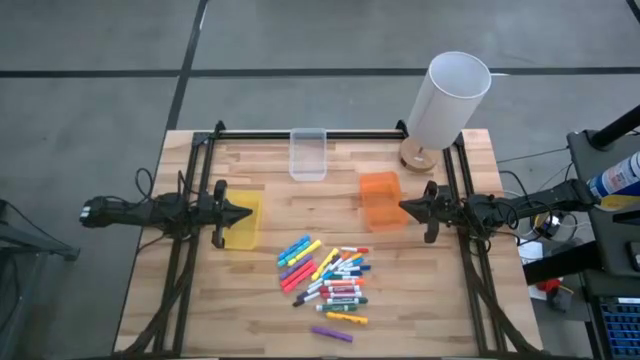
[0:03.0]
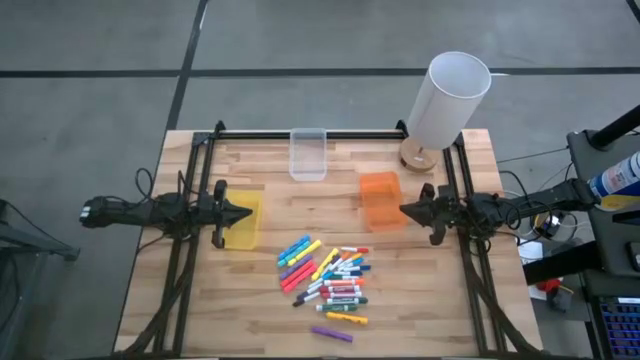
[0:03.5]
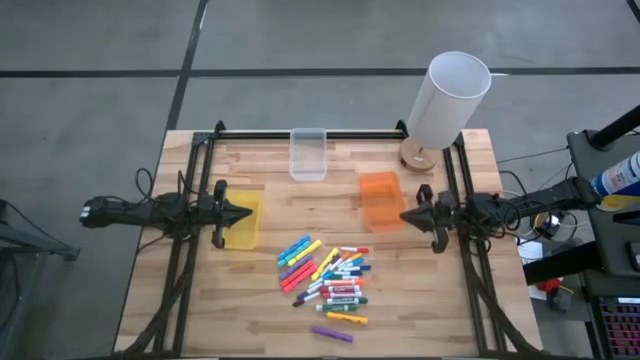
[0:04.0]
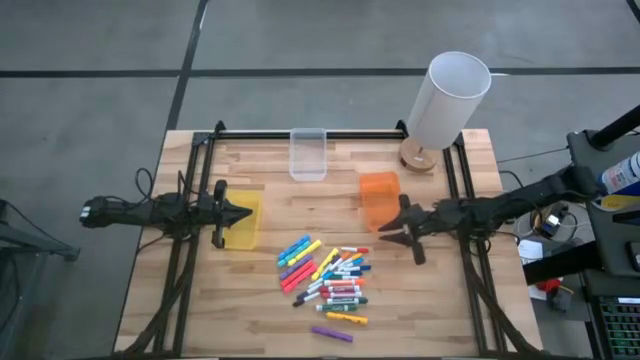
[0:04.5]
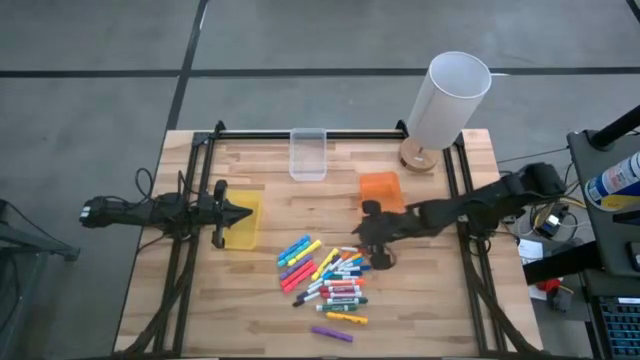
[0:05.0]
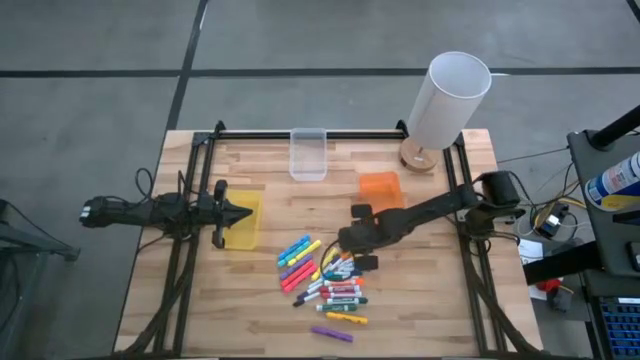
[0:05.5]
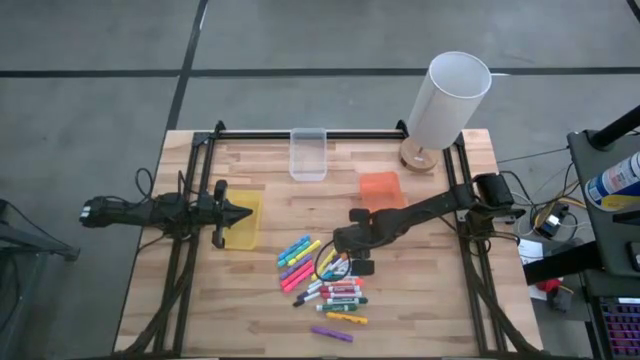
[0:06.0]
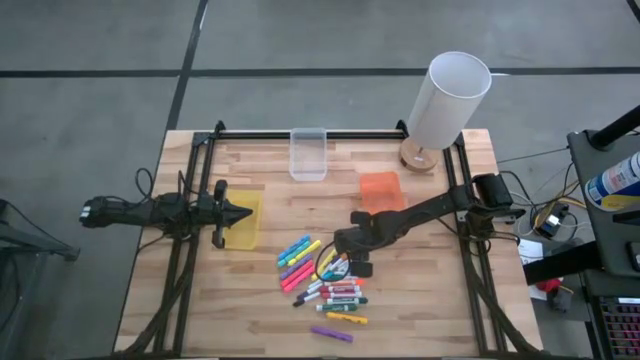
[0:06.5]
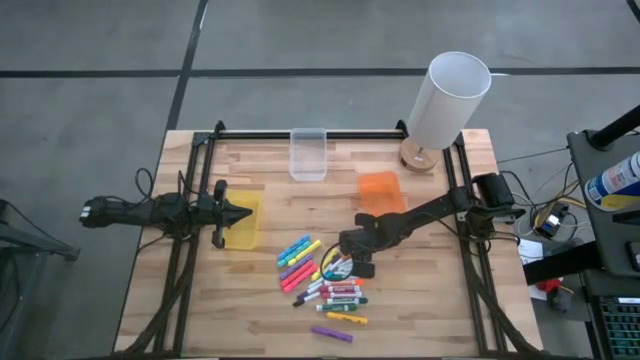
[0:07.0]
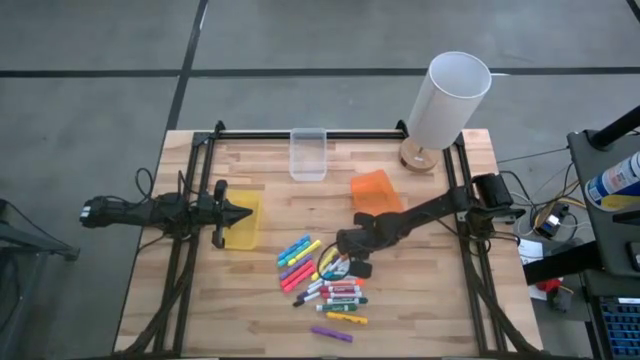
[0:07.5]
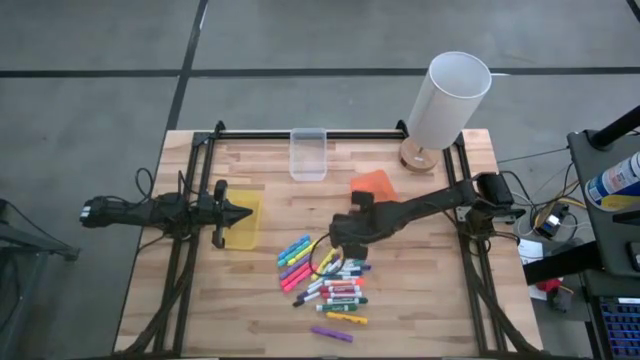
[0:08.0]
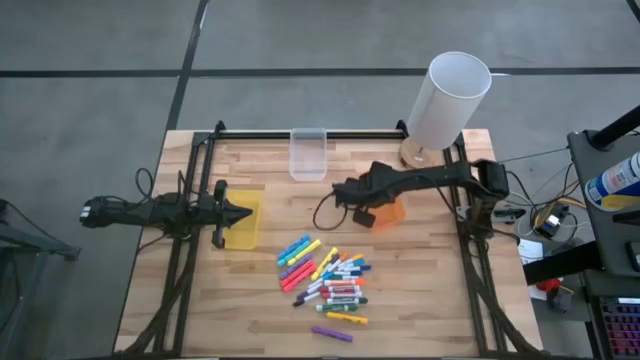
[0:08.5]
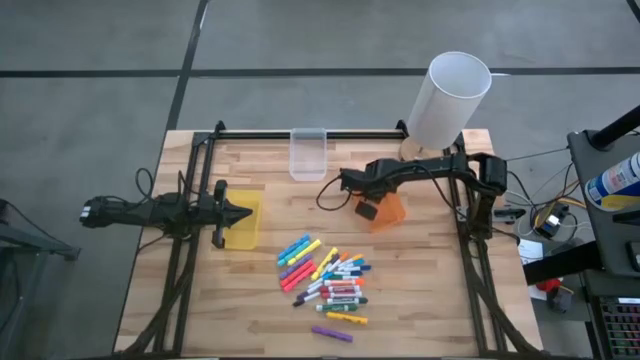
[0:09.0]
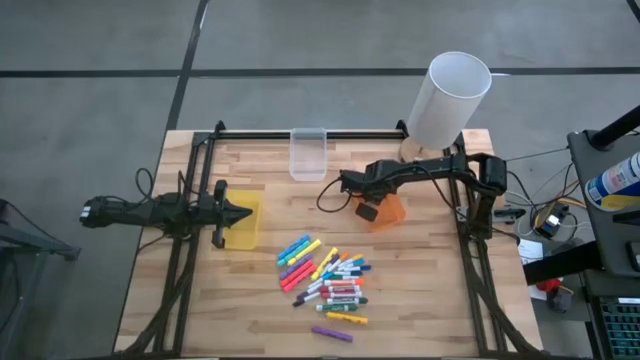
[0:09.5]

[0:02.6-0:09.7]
Task: Pick & Place Markers
Put the small red marker into the orange bin

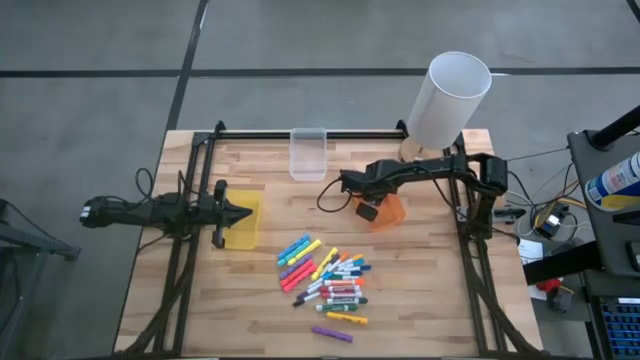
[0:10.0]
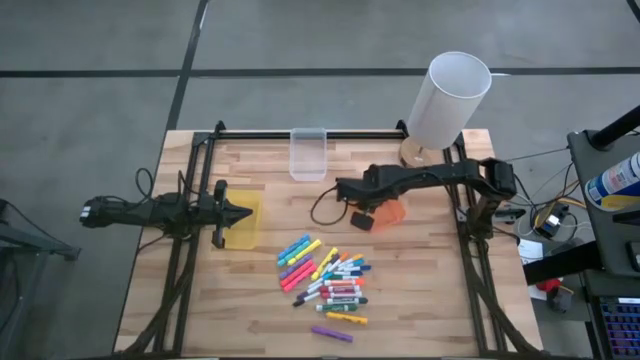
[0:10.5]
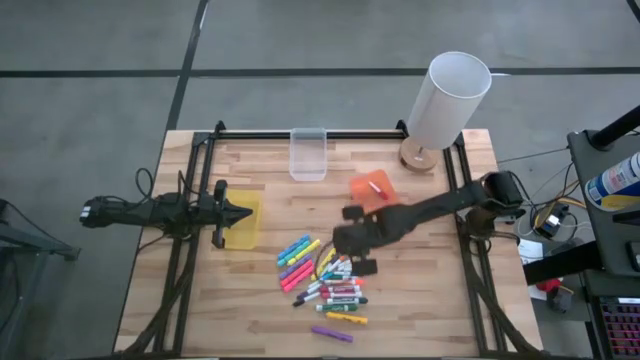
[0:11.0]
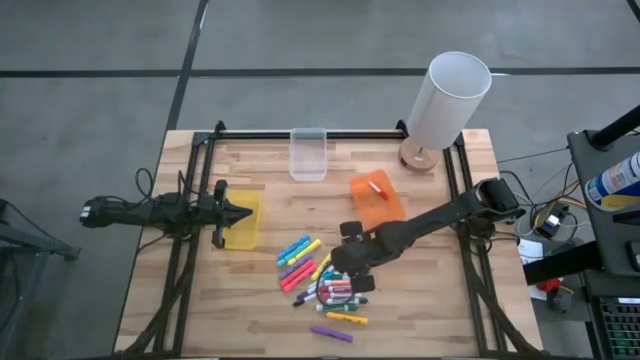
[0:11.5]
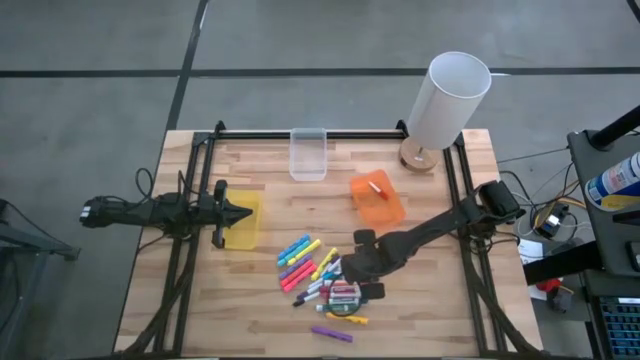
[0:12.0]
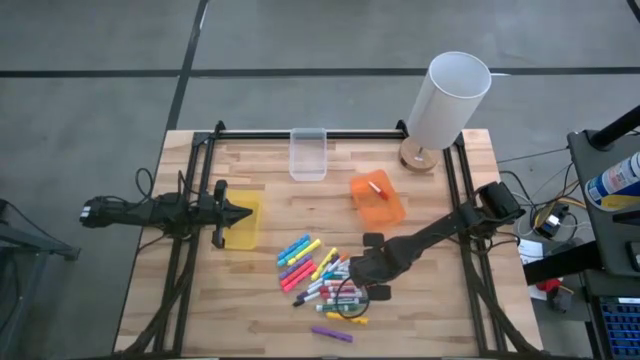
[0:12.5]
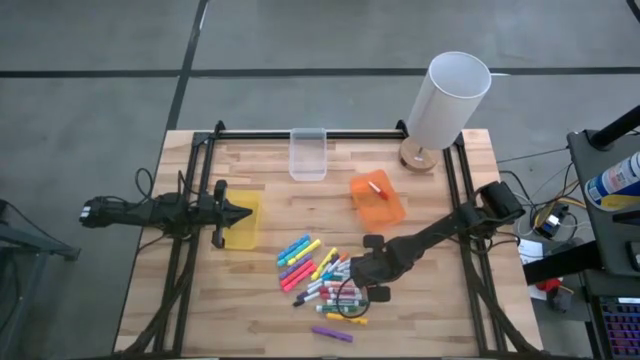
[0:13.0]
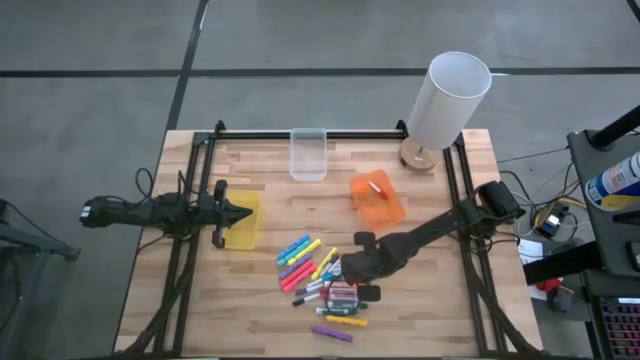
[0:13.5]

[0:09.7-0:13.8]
Put the top small blue marker into the orange bin

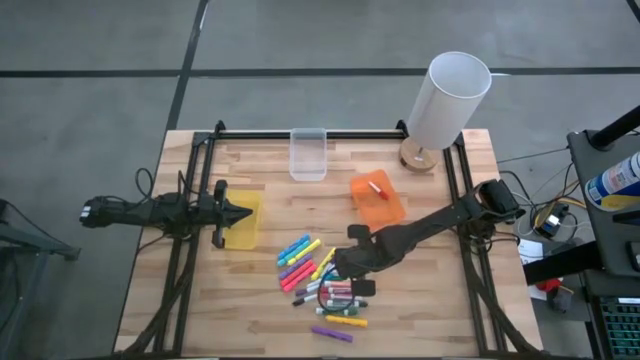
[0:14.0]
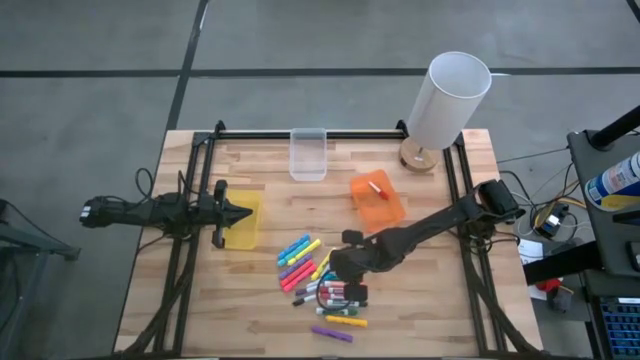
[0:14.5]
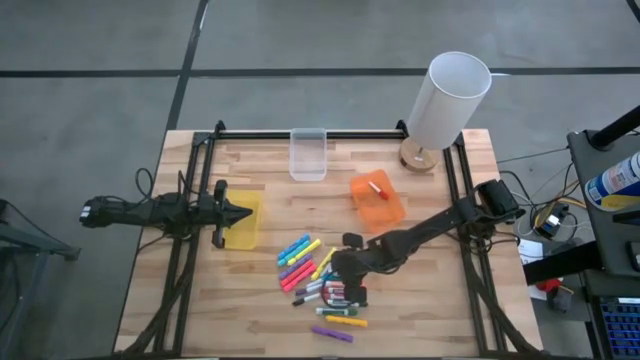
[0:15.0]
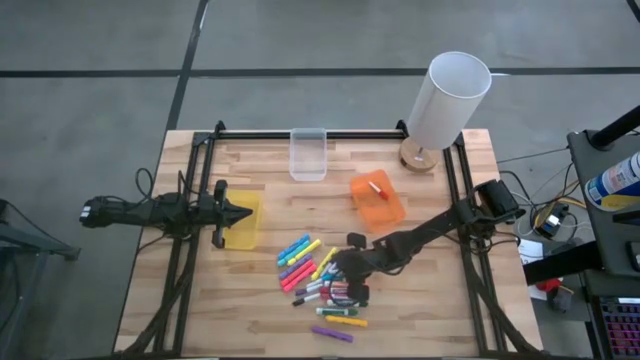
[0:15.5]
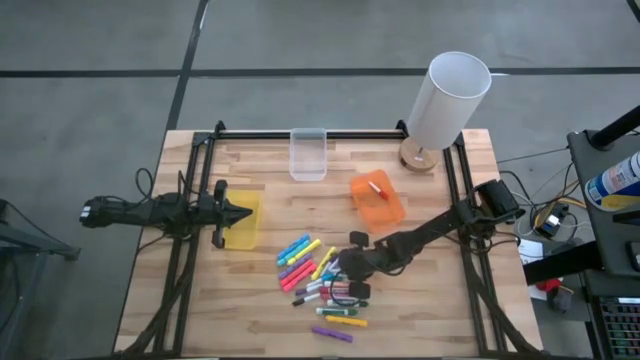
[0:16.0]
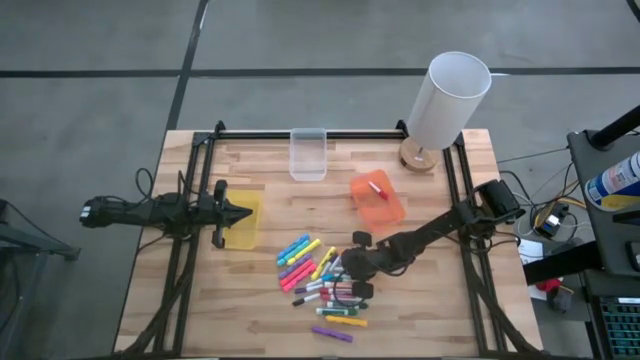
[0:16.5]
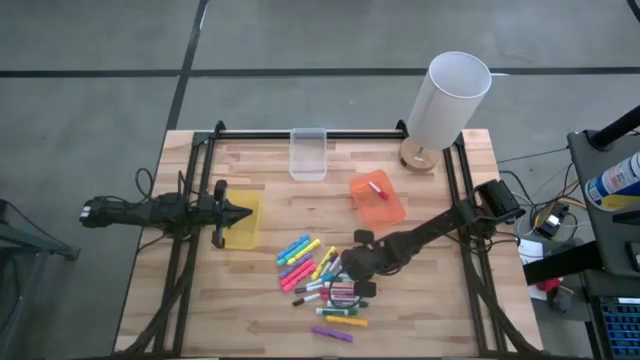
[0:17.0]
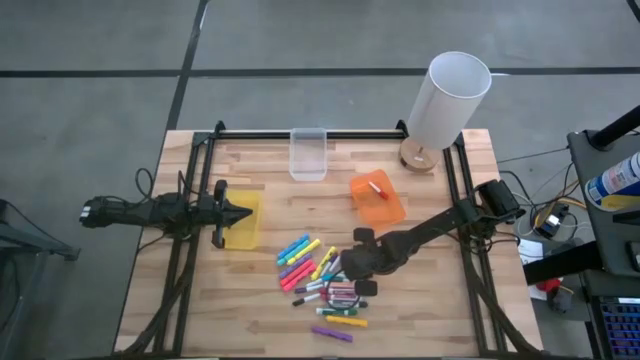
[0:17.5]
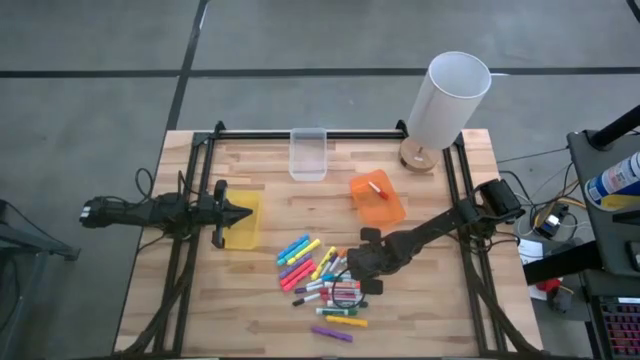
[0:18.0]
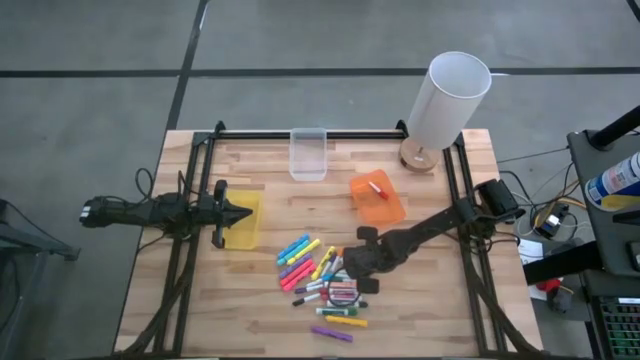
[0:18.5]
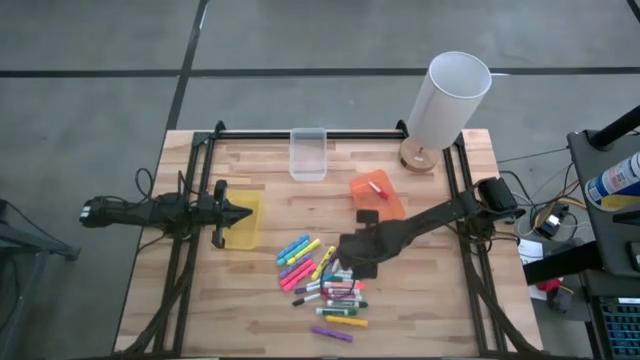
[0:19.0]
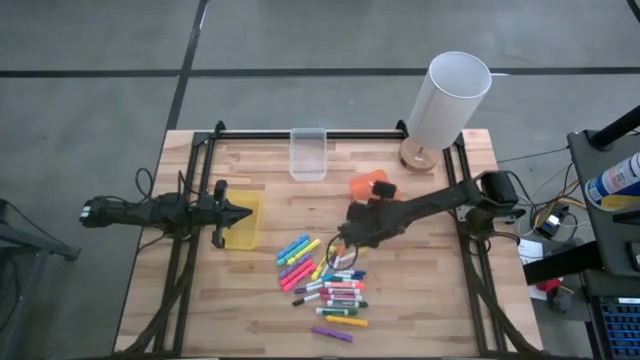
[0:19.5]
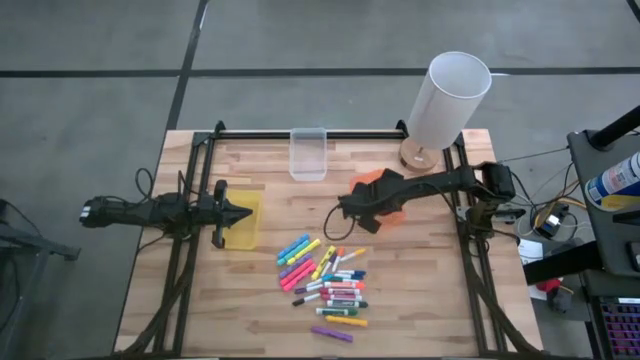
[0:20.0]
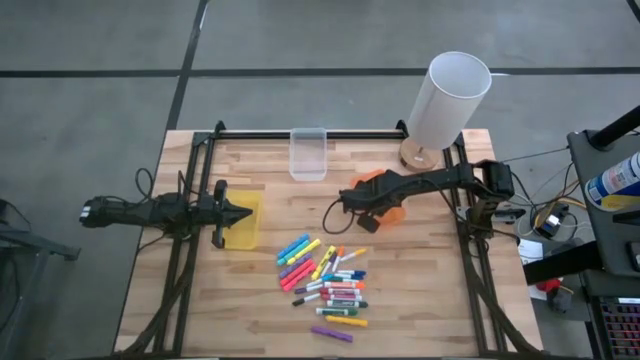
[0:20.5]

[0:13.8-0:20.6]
Put the right small light blue marker into the orange bin

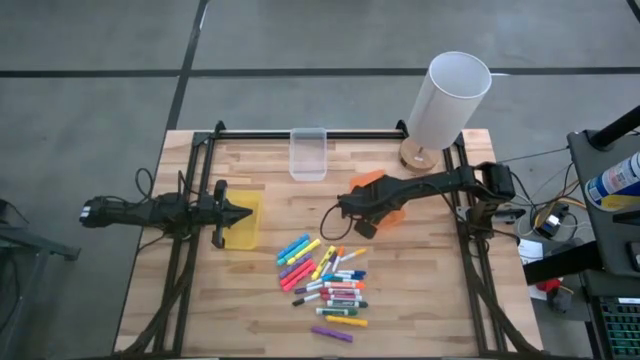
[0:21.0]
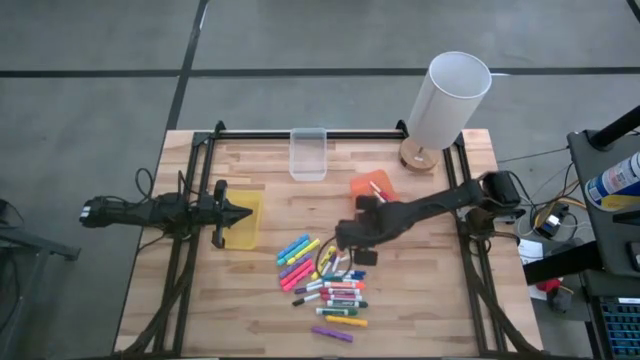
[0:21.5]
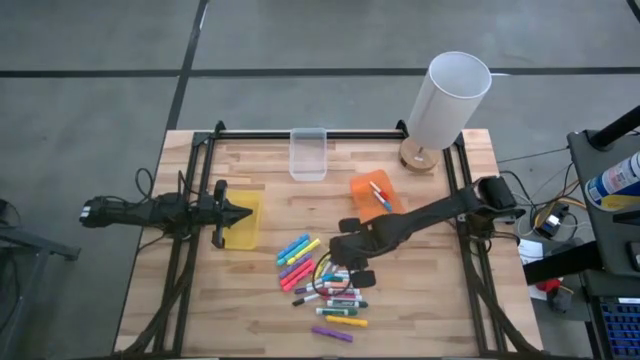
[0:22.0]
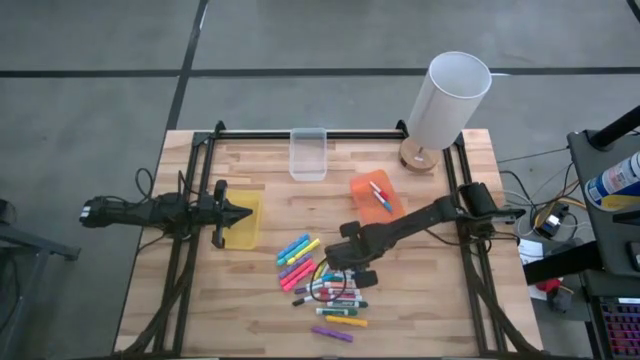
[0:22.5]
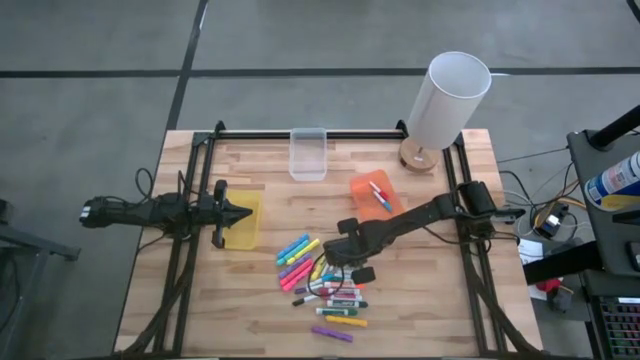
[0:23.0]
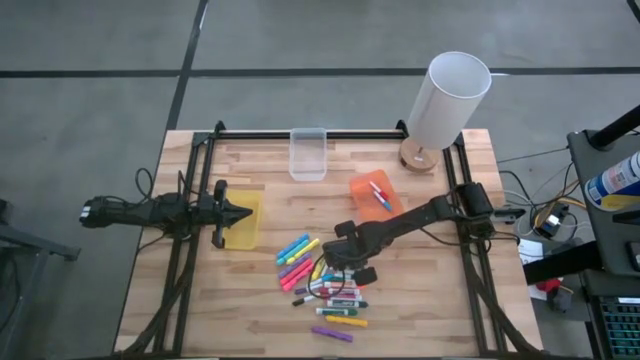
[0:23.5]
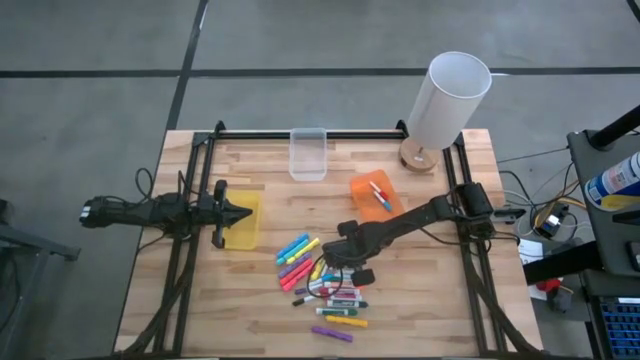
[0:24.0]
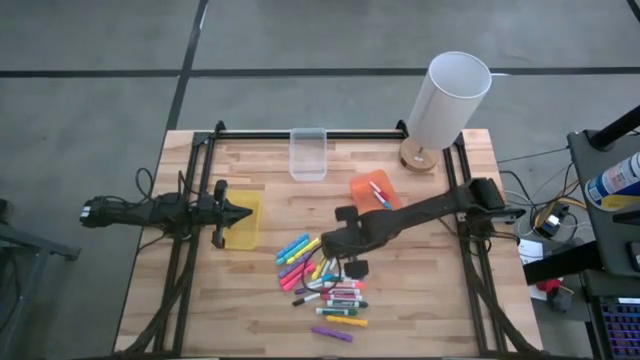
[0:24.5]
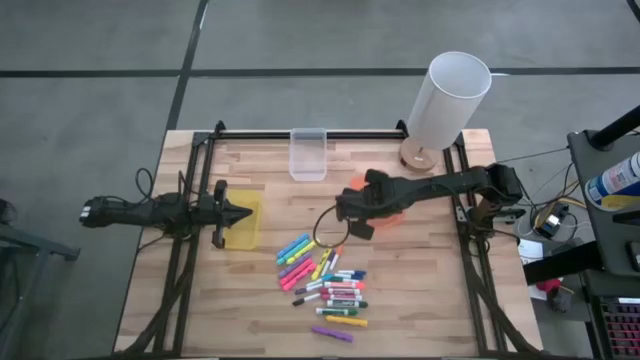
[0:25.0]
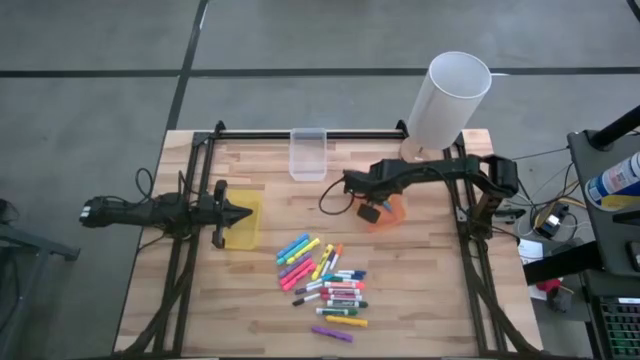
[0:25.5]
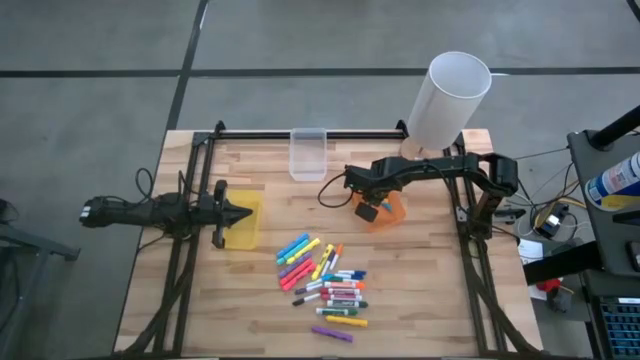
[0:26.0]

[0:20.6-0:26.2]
Put the small yellow marker into the orange bin
